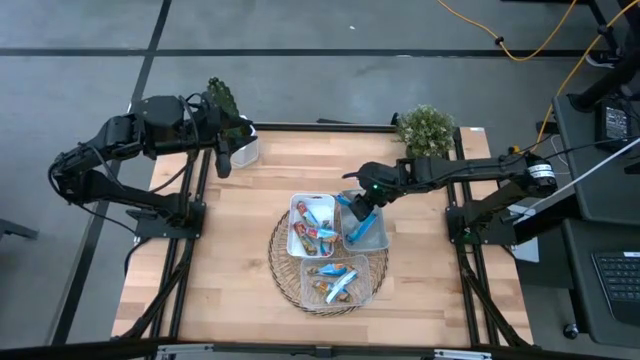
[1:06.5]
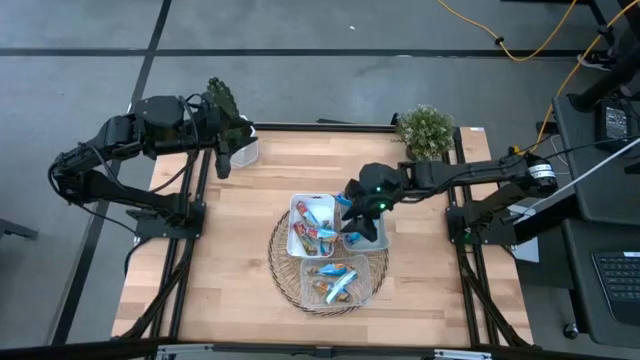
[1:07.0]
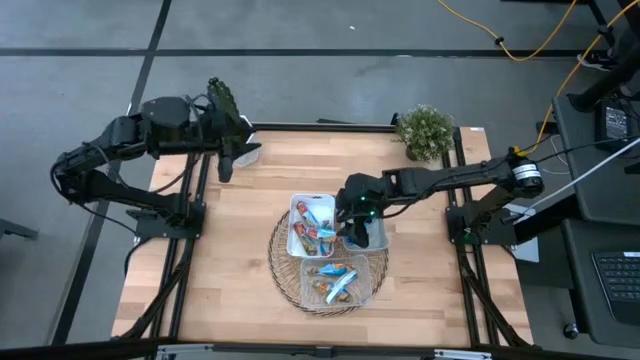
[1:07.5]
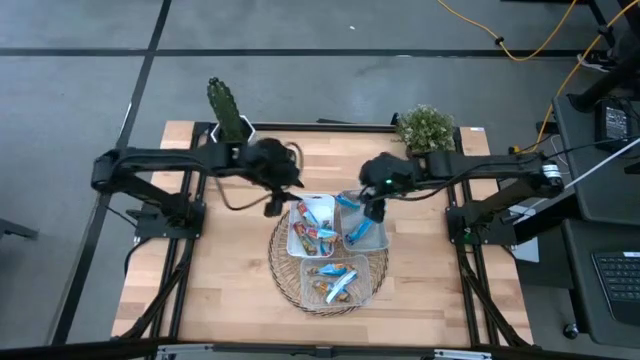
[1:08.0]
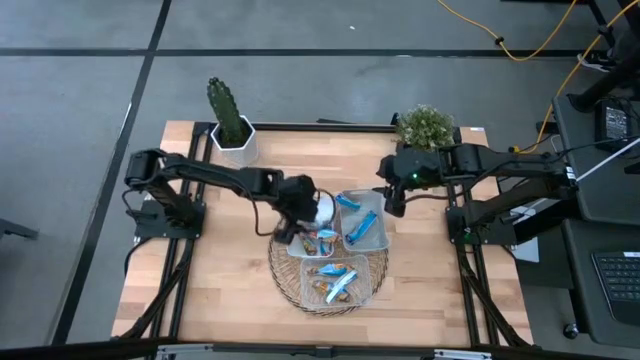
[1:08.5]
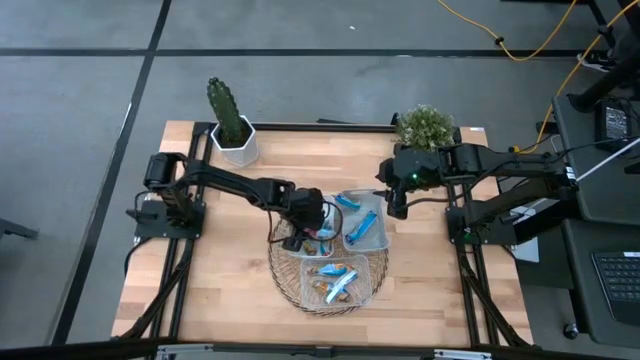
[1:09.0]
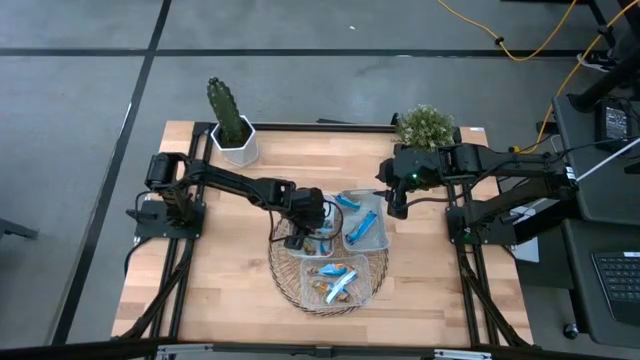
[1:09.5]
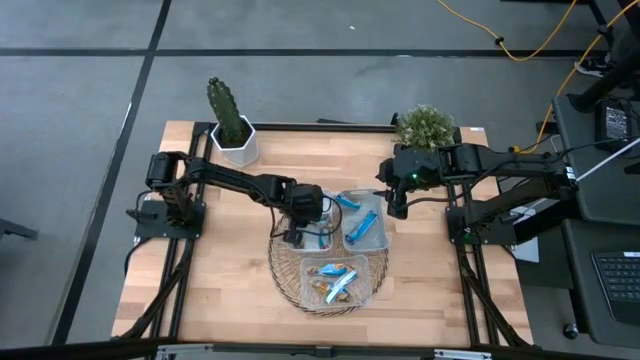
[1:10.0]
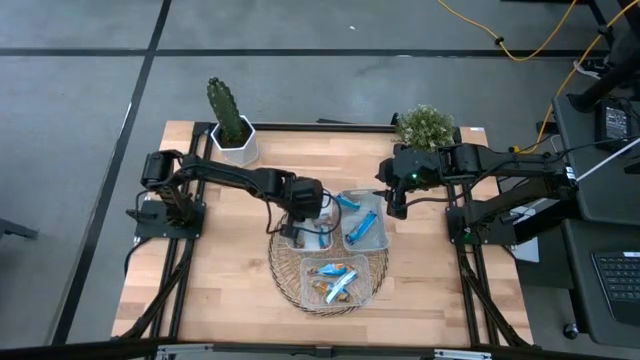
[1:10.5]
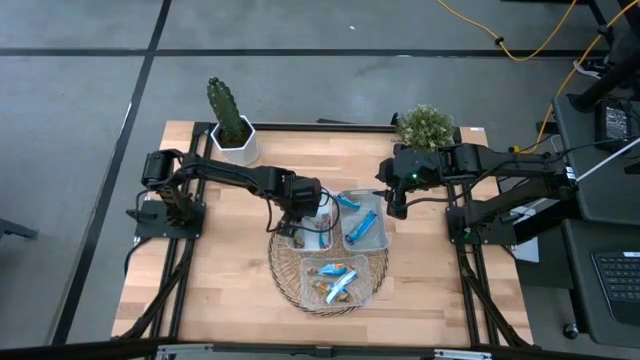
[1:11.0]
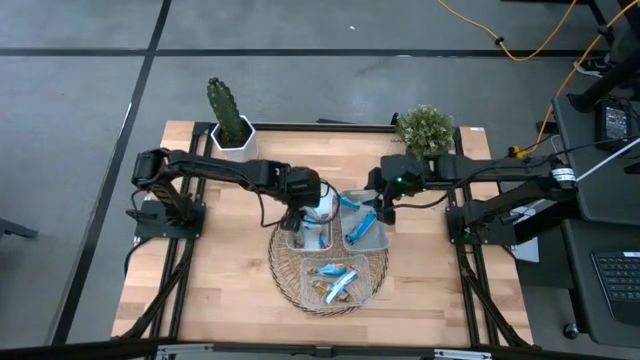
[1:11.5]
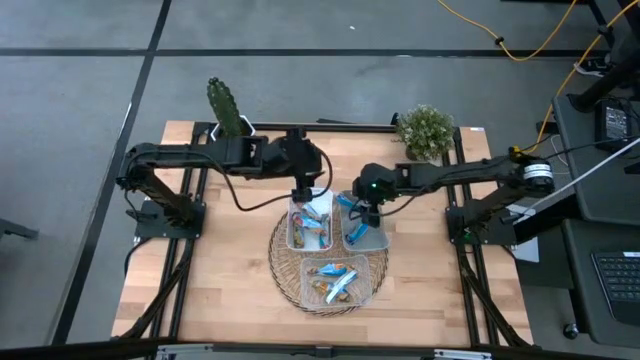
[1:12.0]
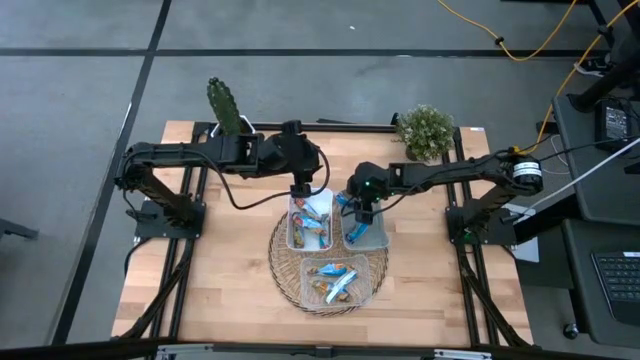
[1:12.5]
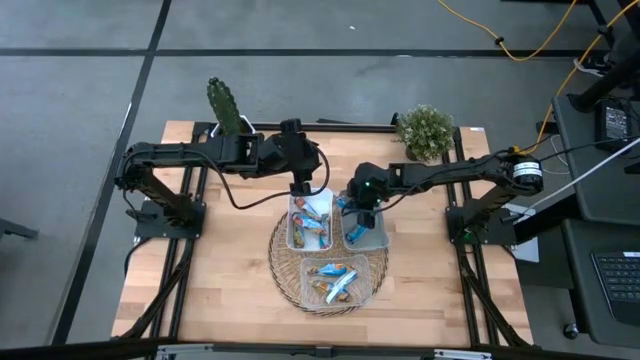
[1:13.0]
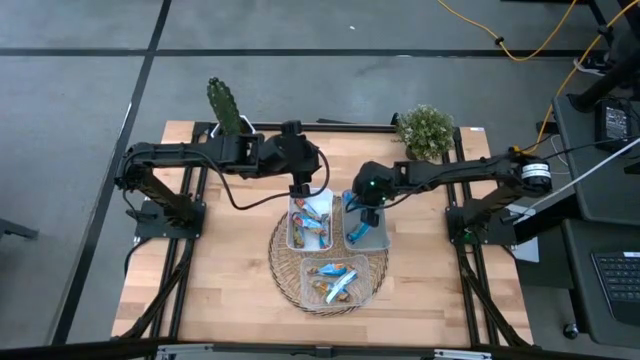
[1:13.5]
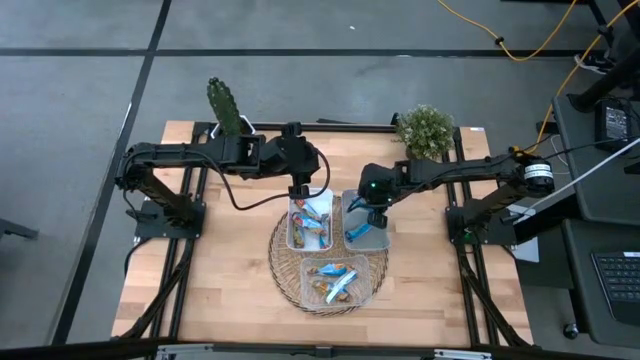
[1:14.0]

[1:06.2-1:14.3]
Task: Pick and place Granola Bars by type
Adjust the granola bars

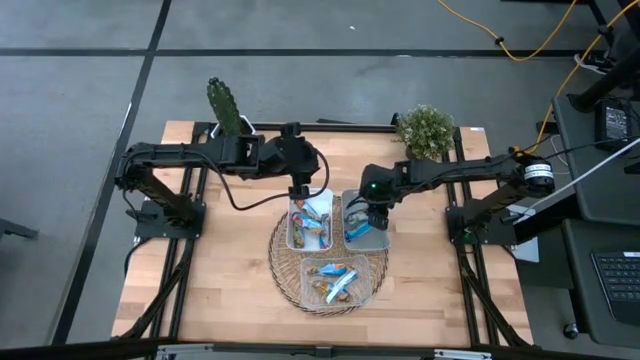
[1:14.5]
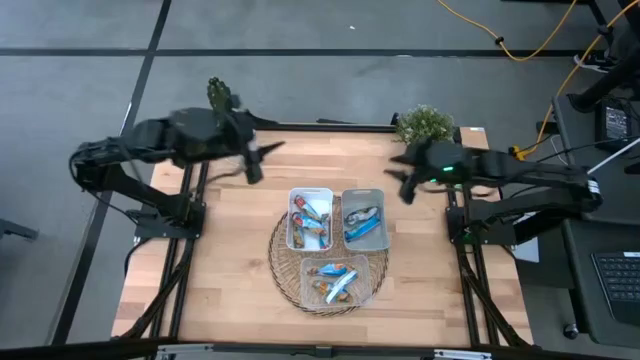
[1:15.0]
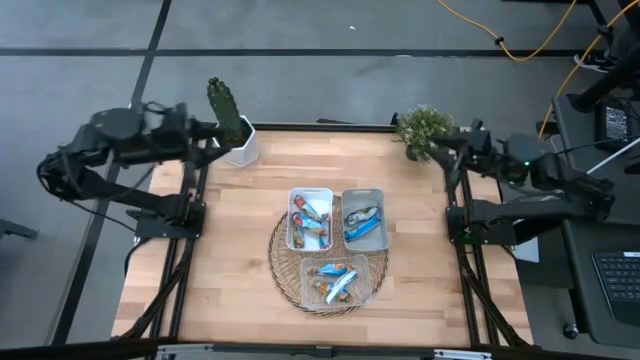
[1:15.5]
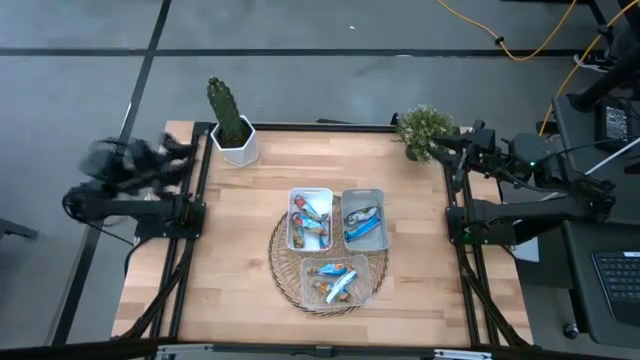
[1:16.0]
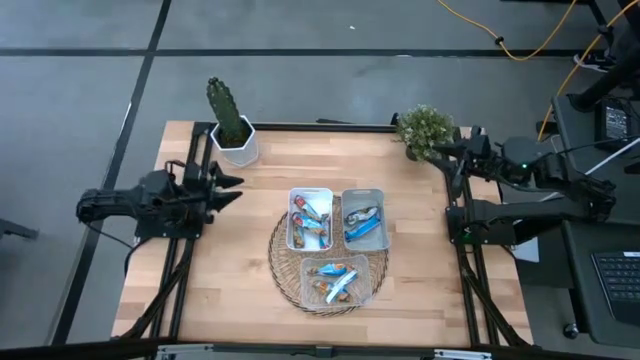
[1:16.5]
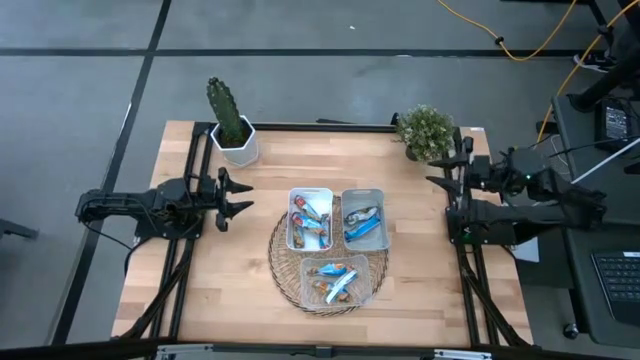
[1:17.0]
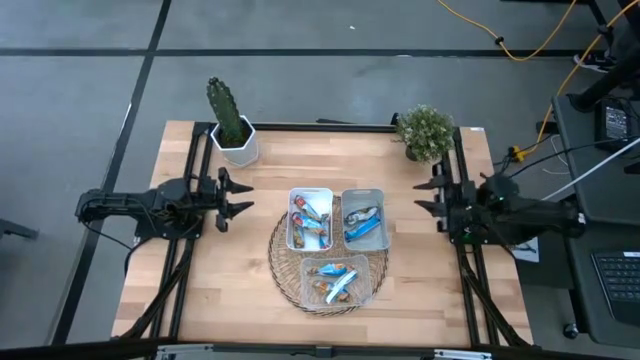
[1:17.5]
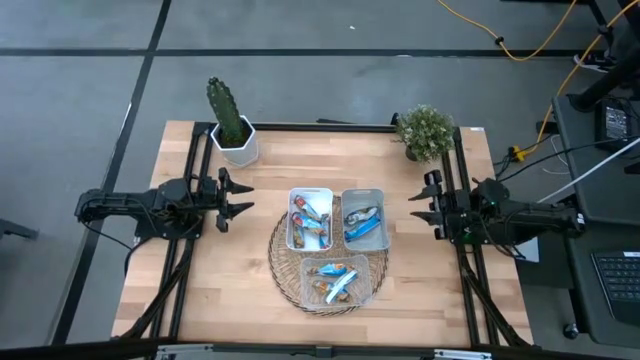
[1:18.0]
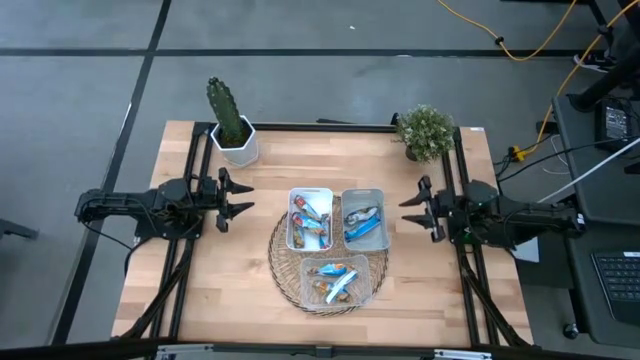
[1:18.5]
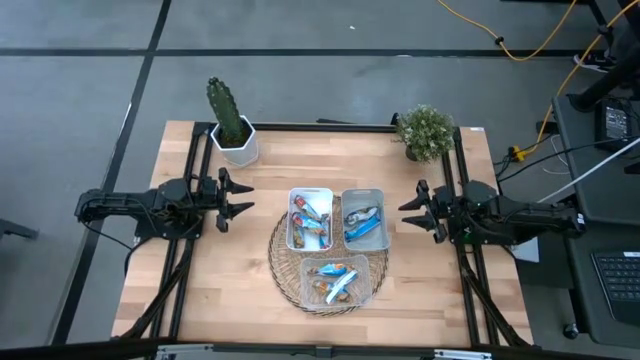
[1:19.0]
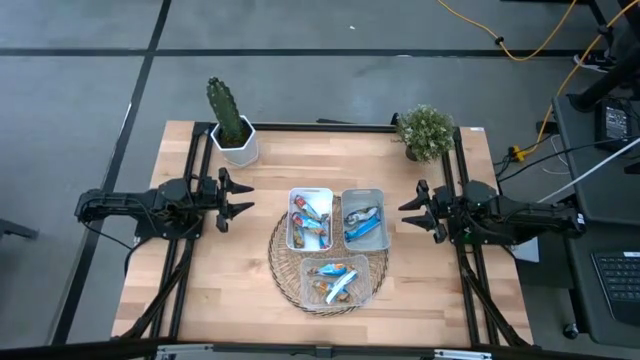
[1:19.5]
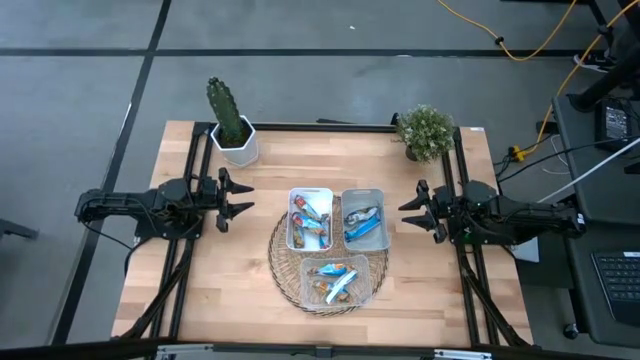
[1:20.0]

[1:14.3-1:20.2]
Return to Home Position

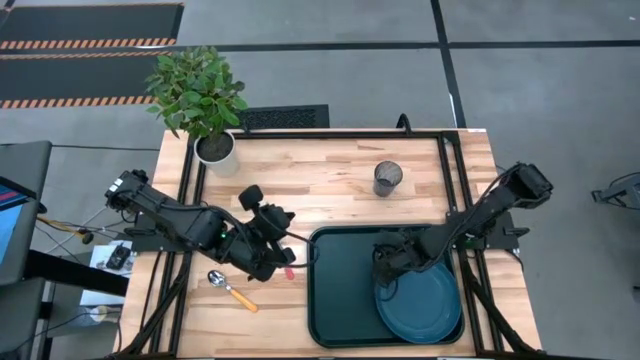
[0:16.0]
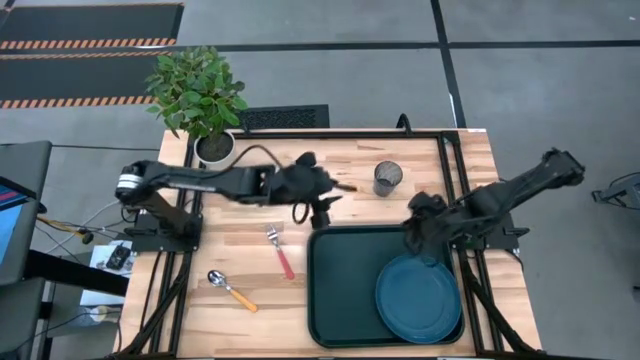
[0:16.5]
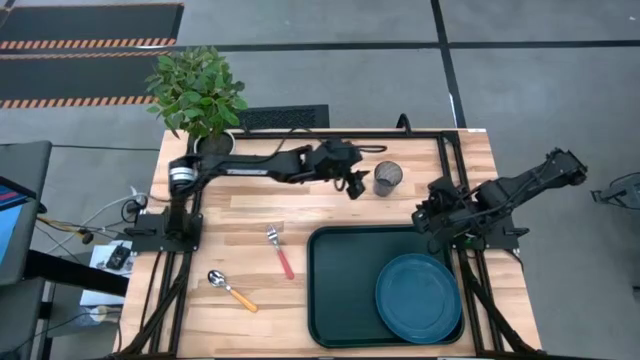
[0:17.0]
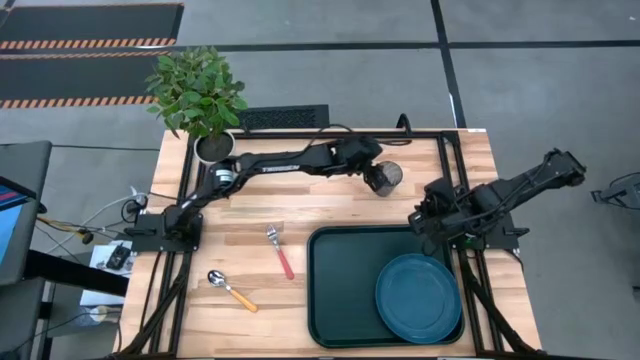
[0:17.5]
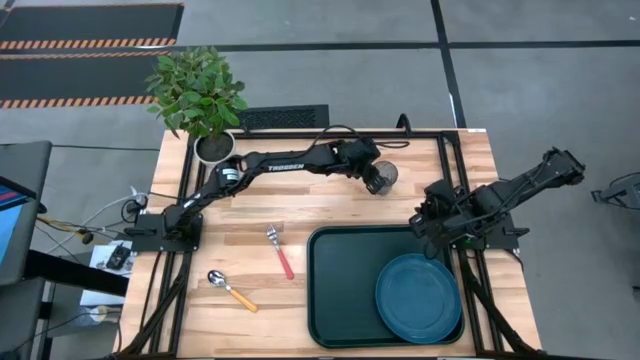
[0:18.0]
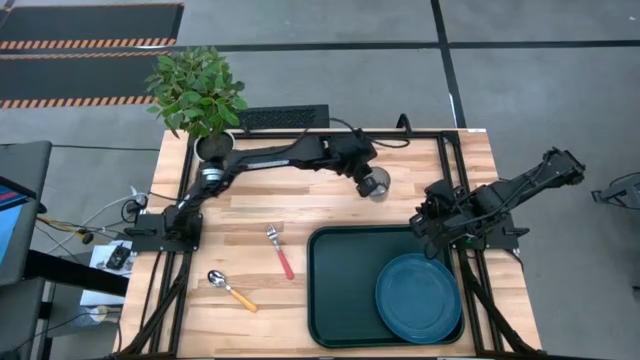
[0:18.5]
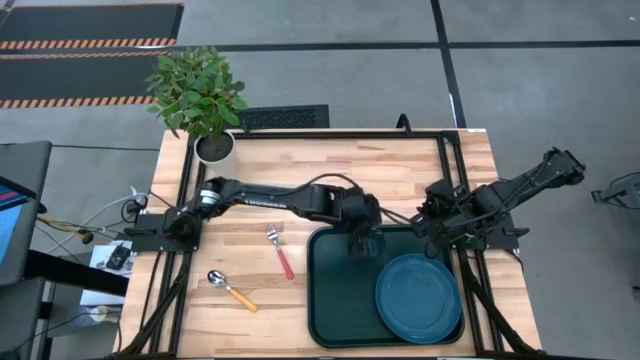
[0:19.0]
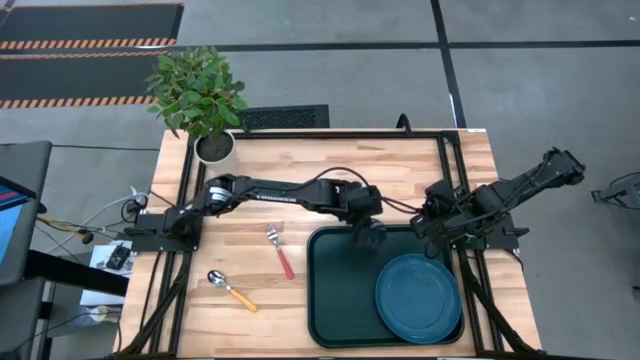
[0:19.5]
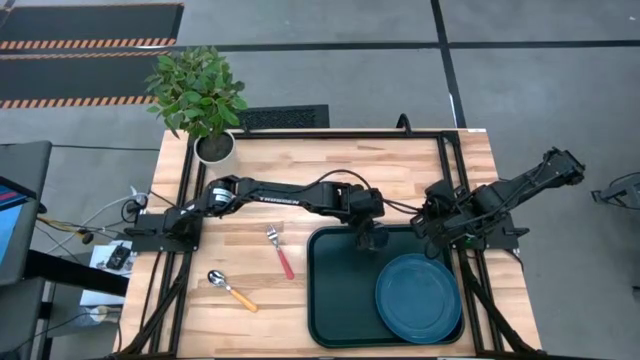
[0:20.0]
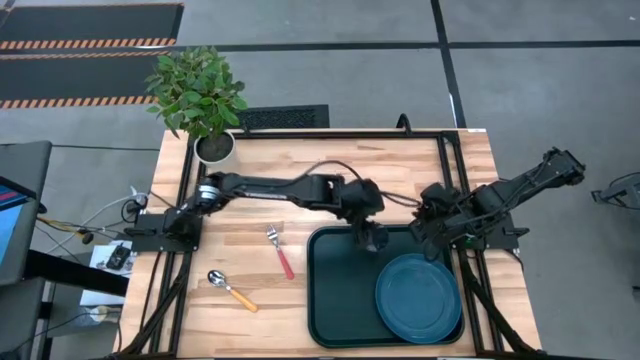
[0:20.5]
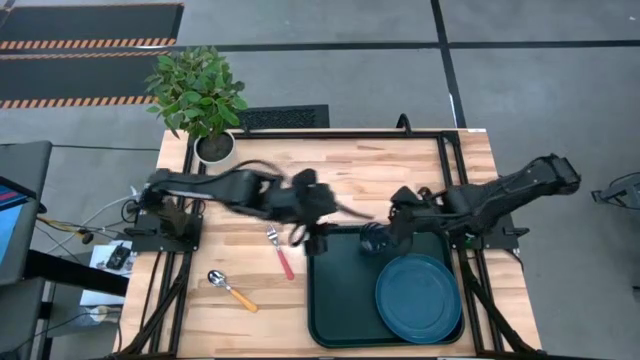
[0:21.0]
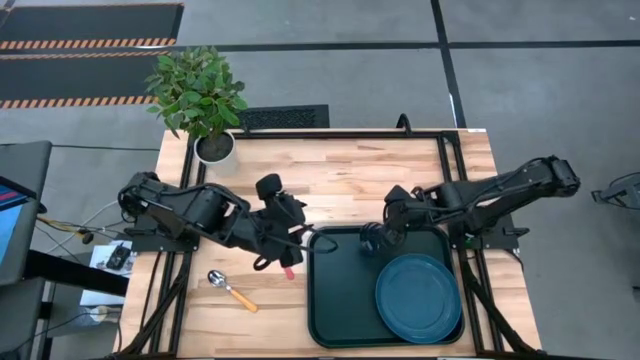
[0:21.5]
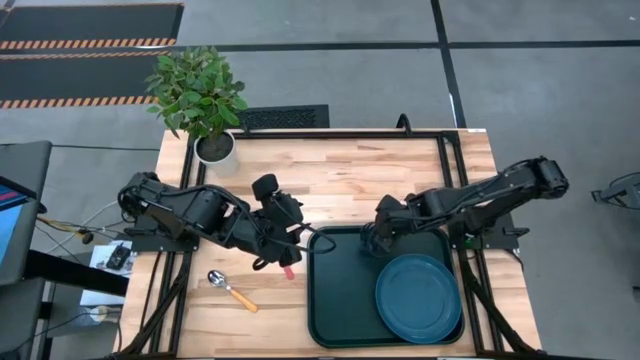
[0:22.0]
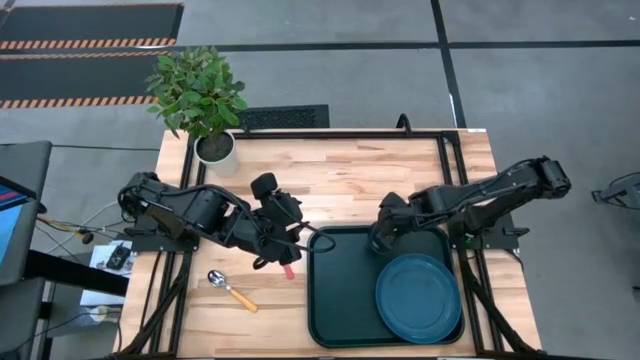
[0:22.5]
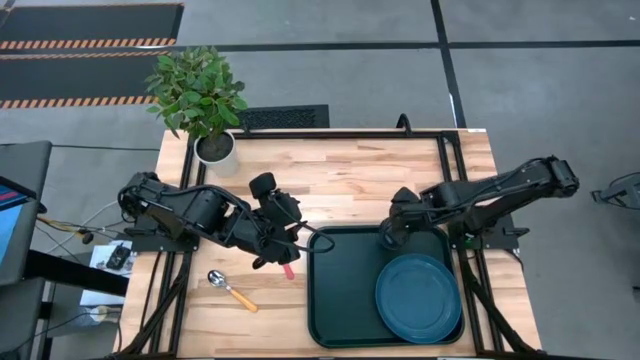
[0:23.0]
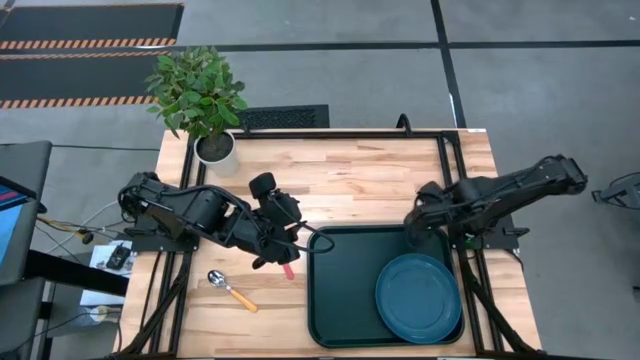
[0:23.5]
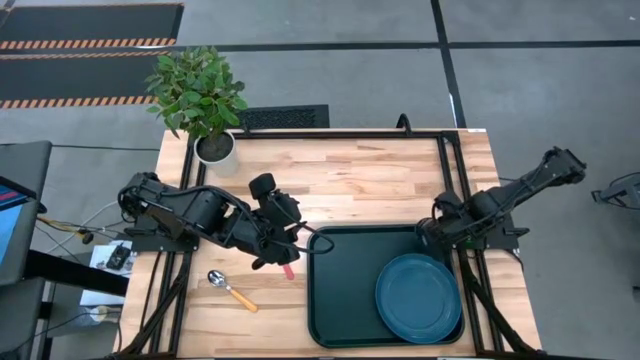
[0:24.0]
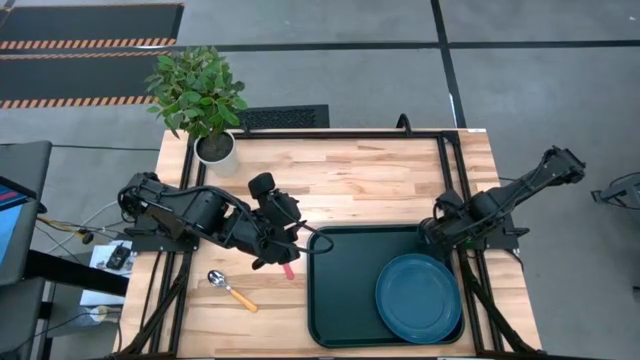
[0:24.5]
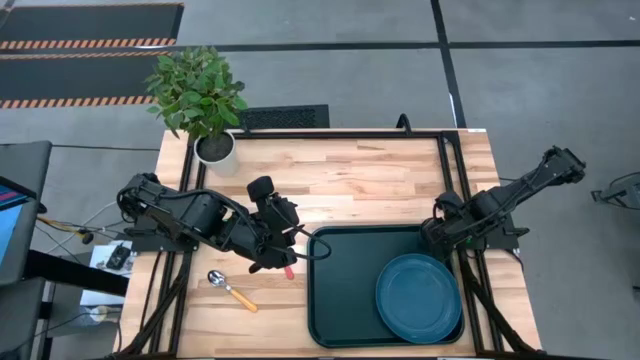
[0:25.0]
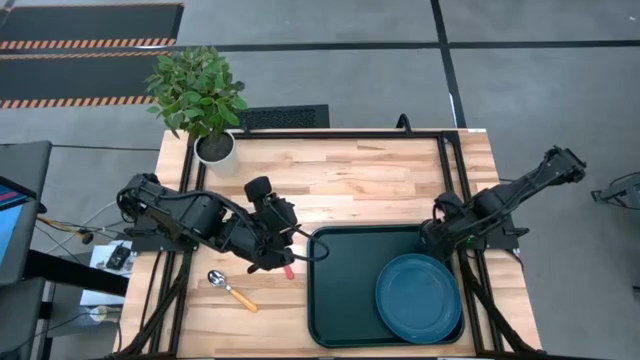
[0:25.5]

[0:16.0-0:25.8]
Task: Pick and place plate/cup/fork/spoon on tray
Put the dark blue glass on the black tray
